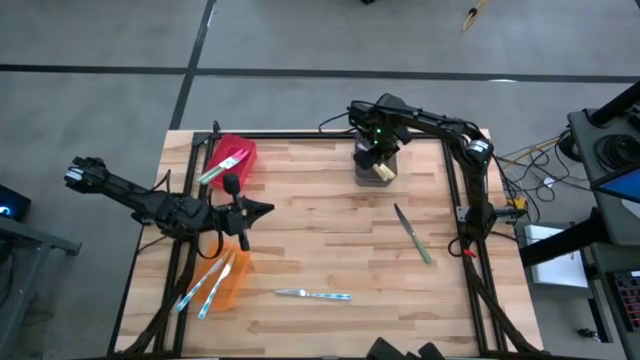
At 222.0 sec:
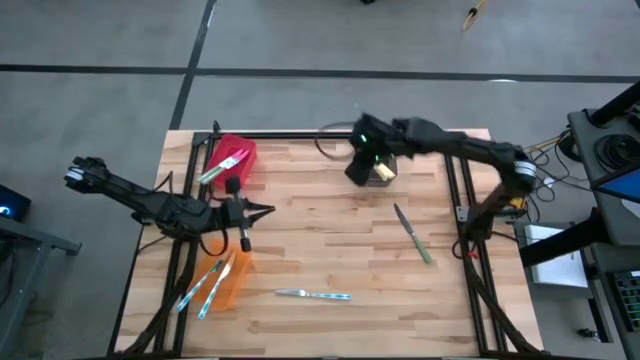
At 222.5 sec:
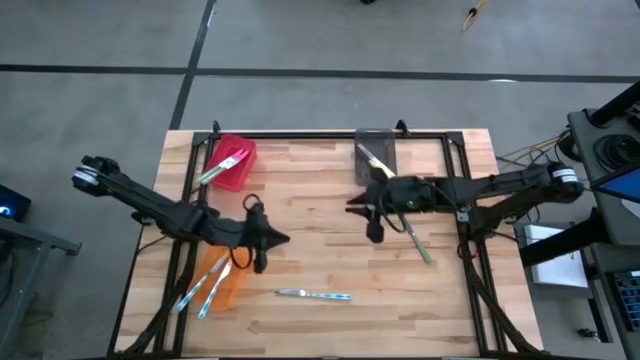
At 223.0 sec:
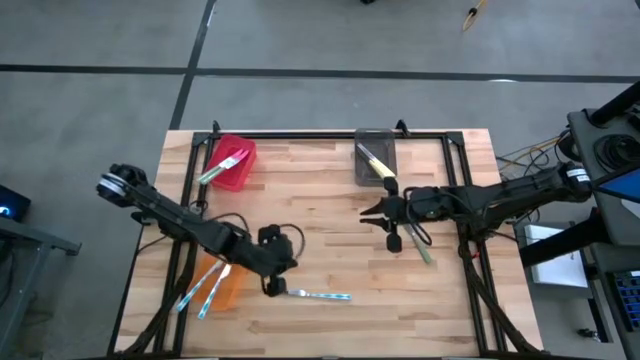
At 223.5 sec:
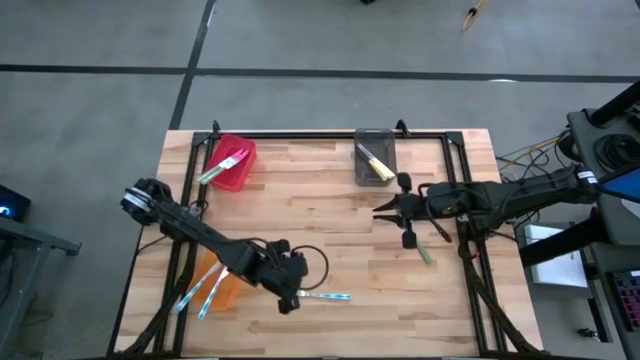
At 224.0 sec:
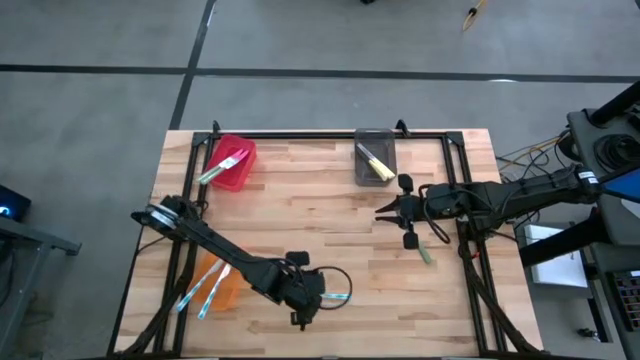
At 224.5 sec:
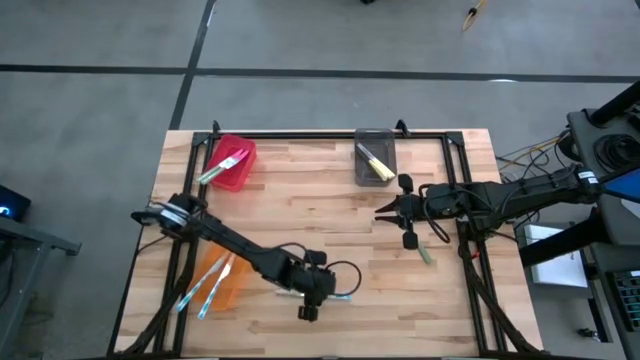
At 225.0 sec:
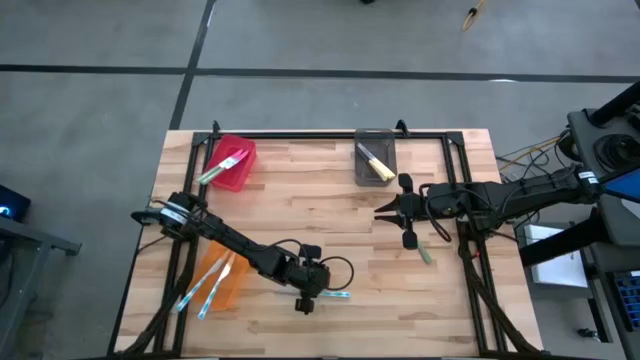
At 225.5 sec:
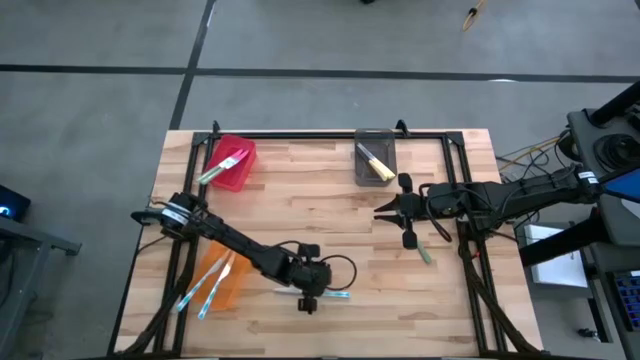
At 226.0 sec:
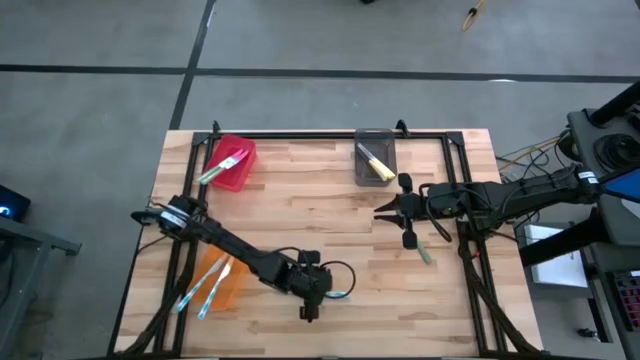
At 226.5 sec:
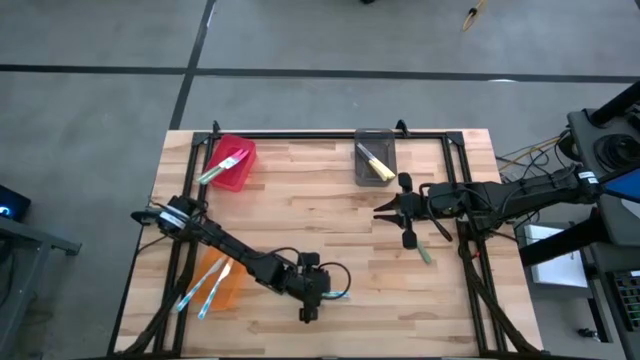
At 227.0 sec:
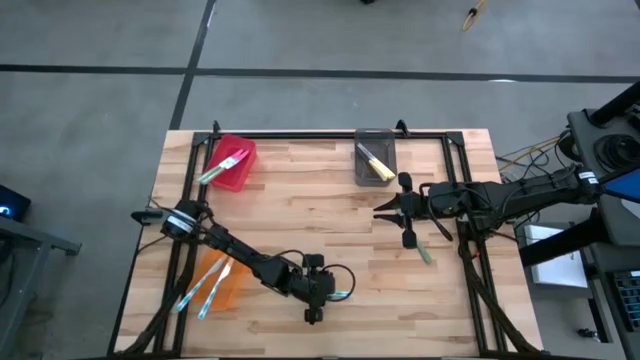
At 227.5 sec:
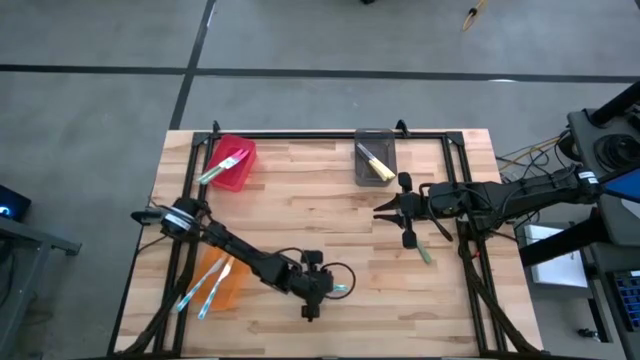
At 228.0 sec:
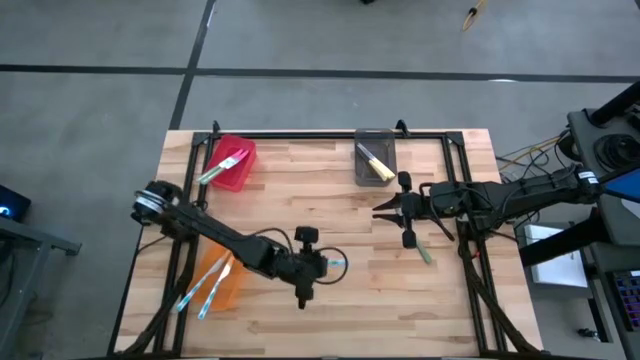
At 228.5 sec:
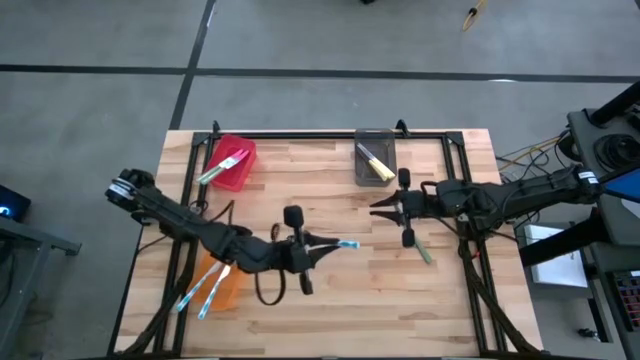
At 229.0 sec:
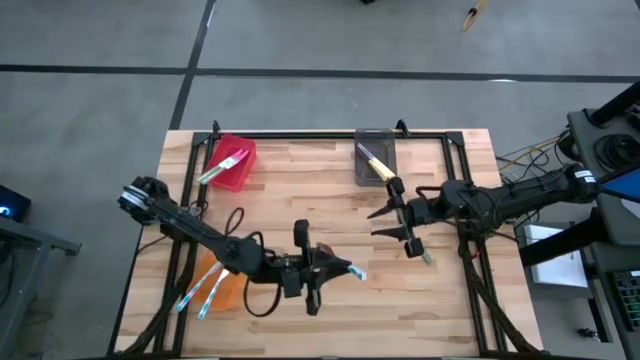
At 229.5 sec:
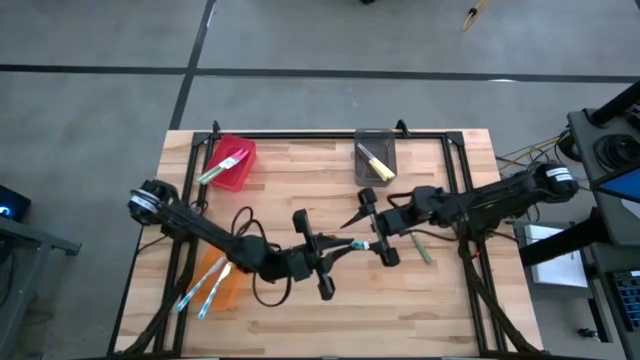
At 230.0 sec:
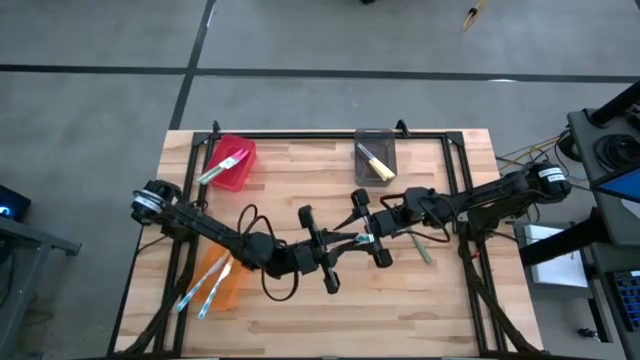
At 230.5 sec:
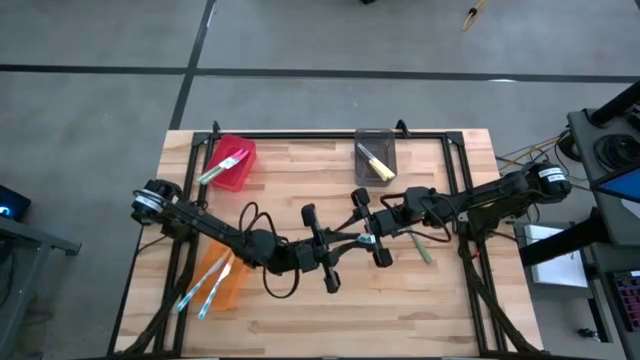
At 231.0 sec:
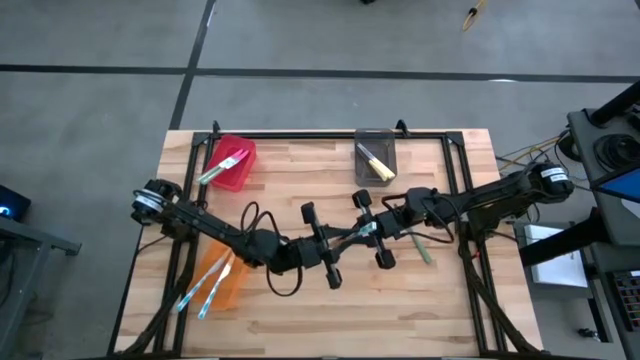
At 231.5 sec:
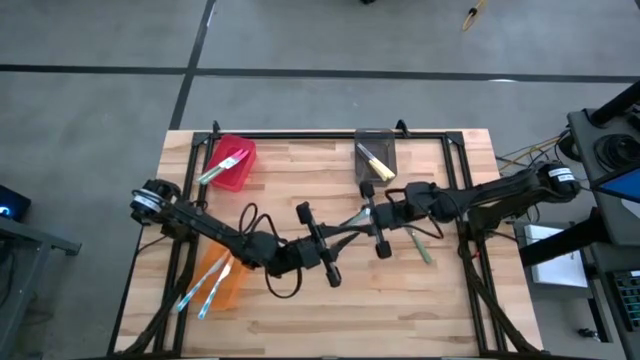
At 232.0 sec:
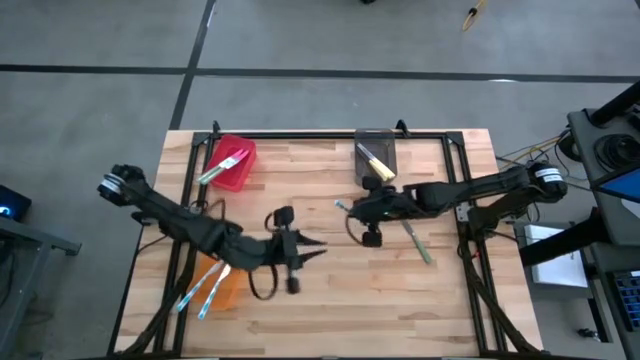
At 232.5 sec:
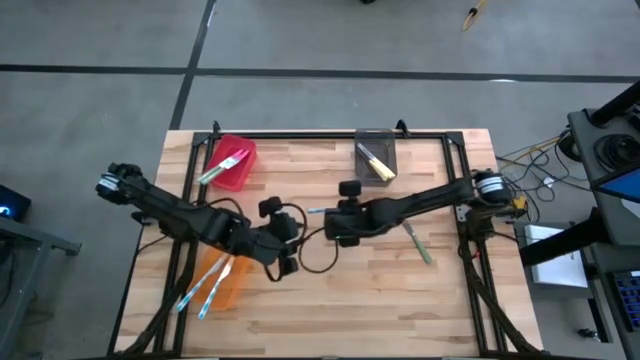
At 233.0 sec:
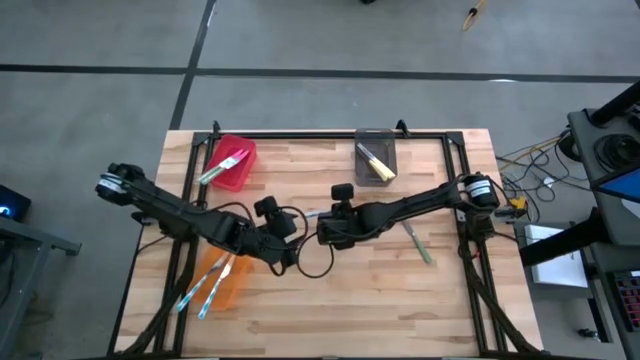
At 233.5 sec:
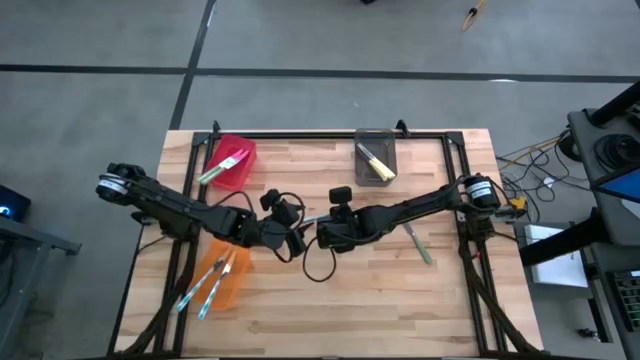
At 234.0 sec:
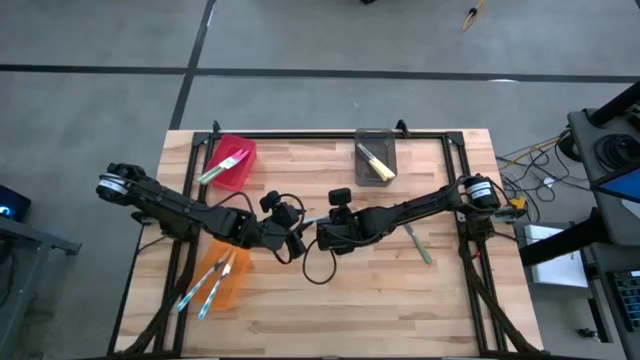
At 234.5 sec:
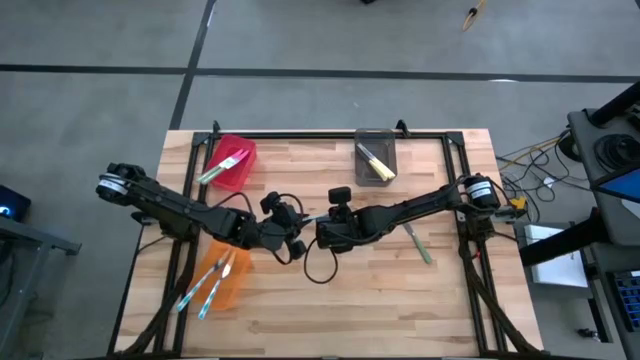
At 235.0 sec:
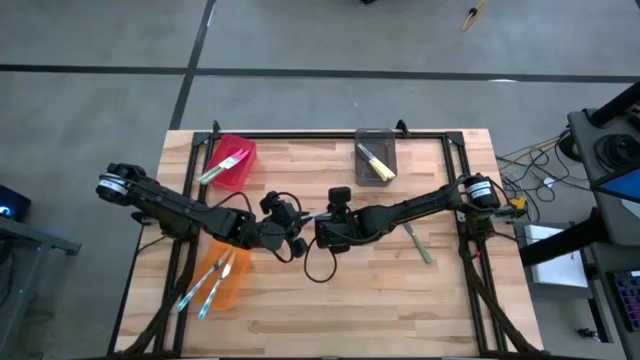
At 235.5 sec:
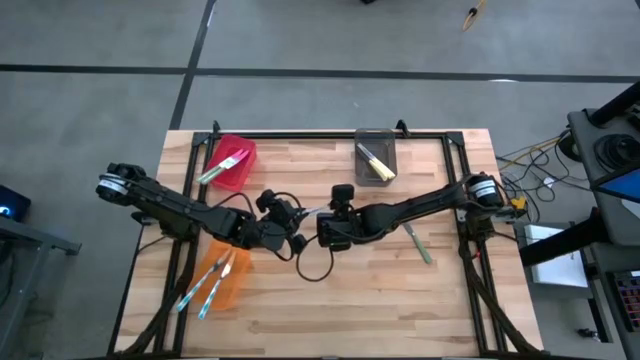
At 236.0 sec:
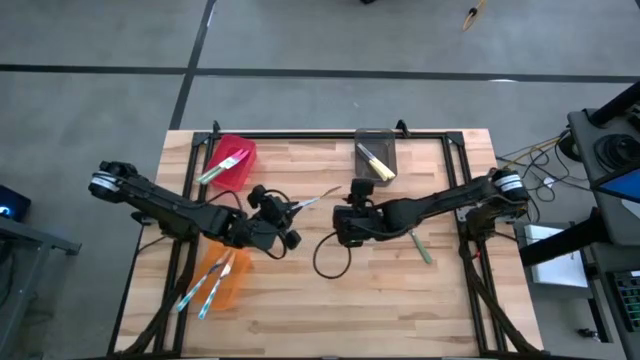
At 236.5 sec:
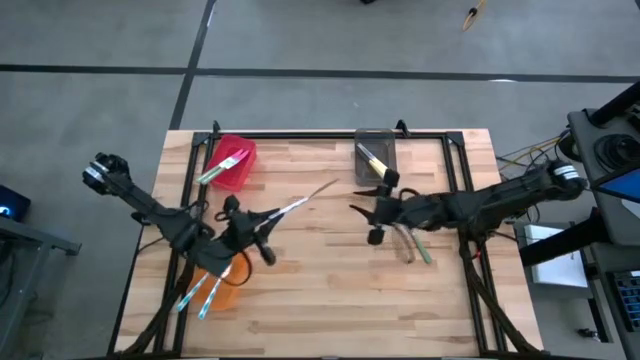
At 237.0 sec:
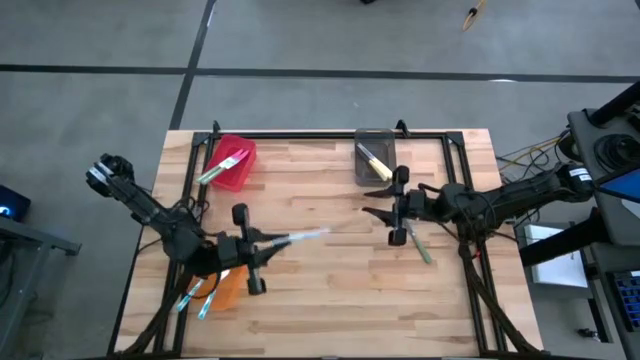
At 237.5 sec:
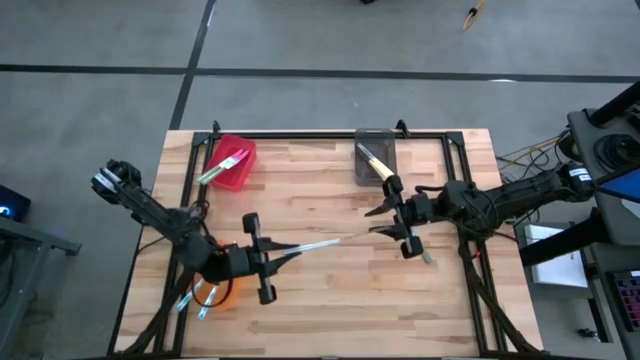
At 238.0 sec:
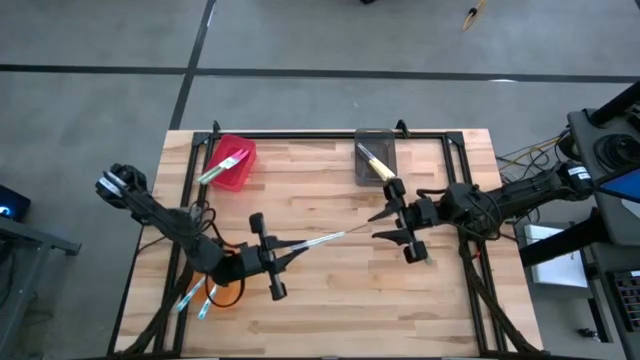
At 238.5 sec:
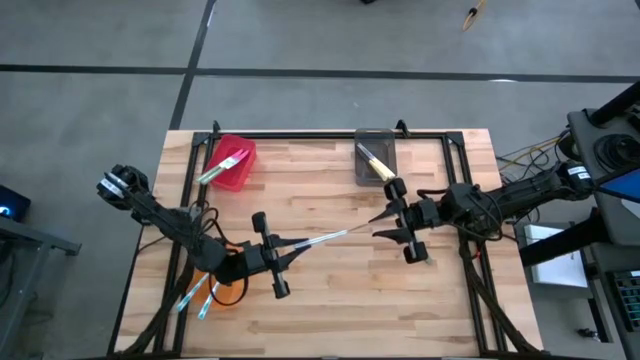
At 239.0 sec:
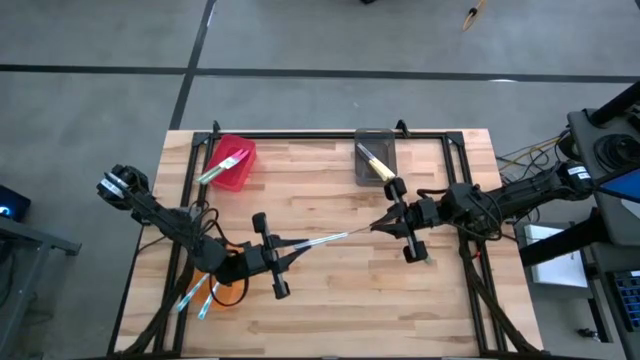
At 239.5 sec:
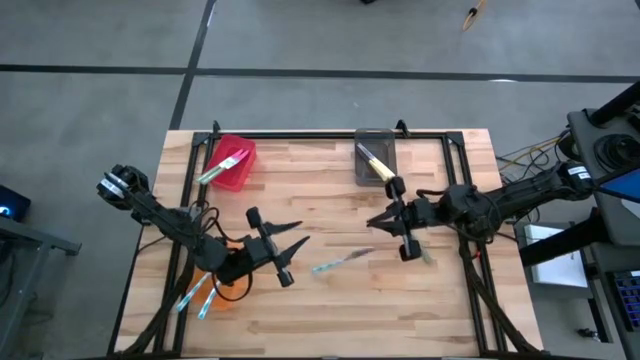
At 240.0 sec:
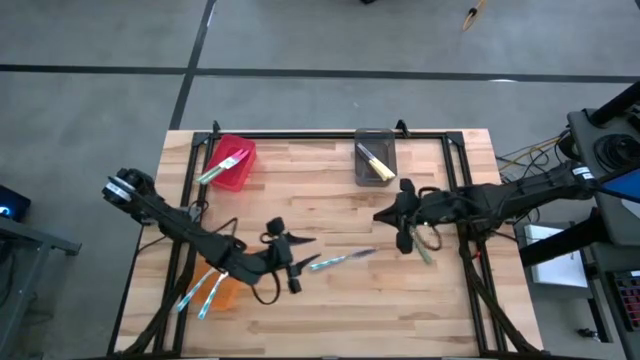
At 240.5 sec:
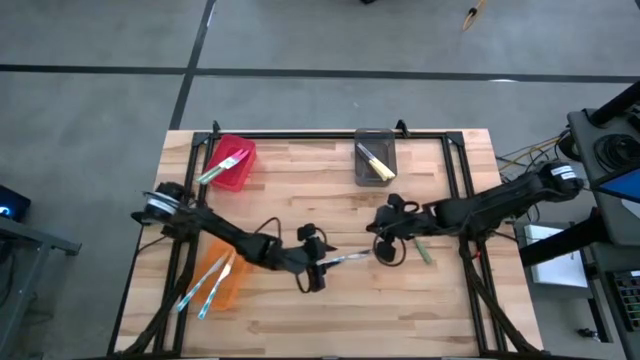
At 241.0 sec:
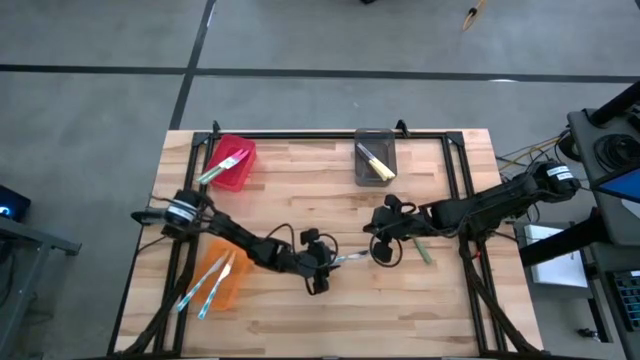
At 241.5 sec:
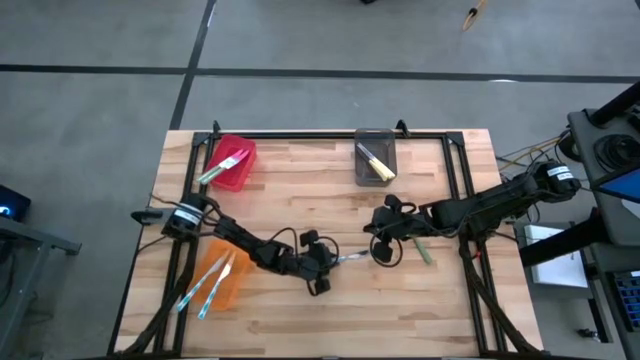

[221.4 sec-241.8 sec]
Task: Sort silverware by color (type)
Put the blue knife into the orange bin

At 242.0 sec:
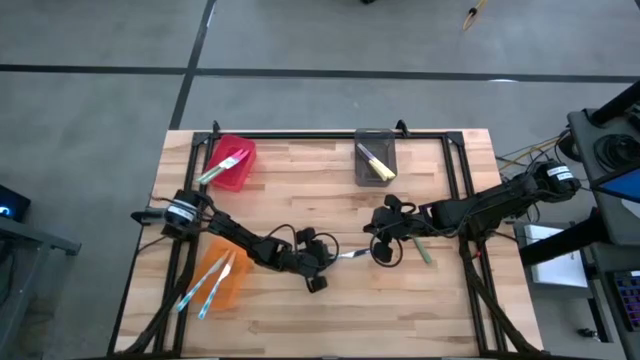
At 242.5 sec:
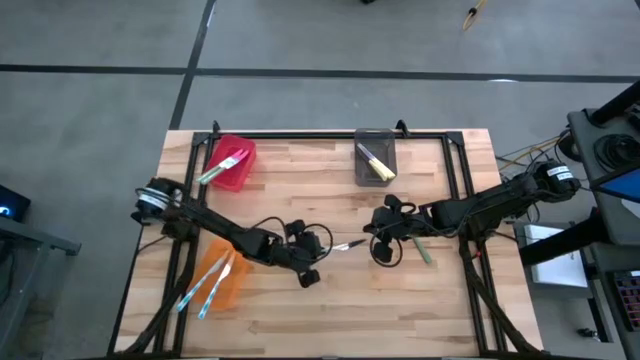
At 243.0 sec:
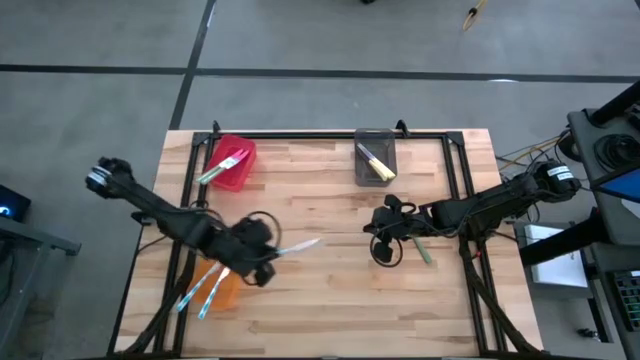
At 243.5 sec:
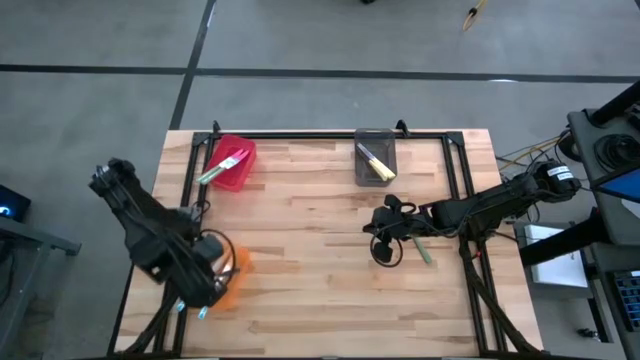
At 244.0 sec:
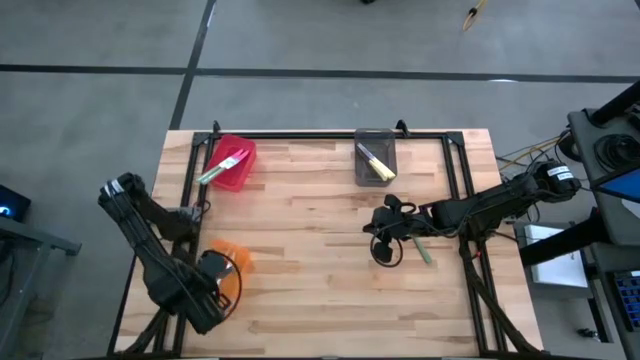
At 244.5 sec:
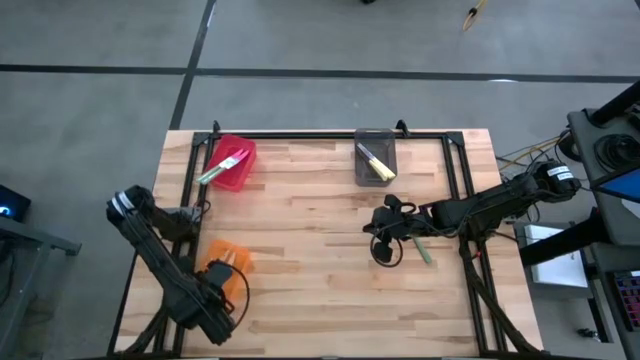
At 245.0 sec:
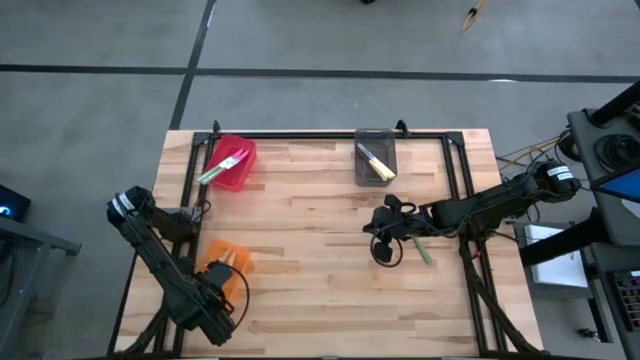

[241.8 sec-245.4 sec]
Put the blue knife into the orange bin
